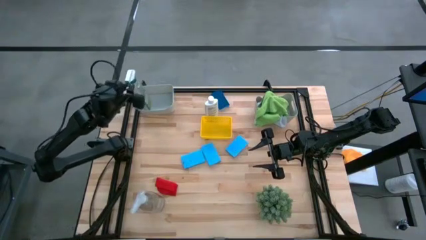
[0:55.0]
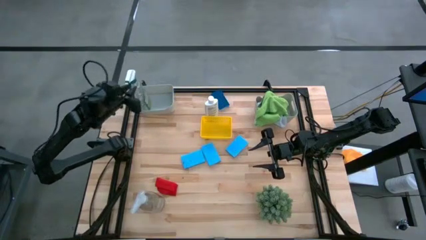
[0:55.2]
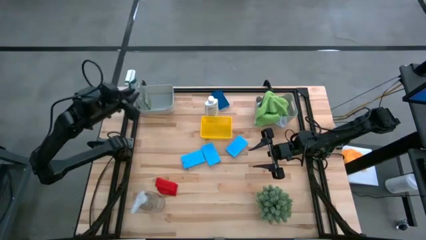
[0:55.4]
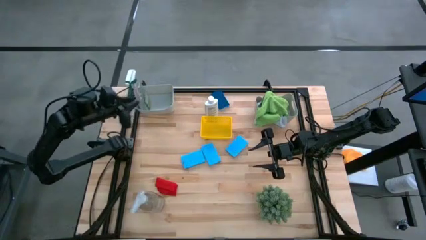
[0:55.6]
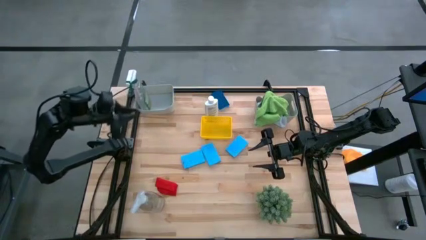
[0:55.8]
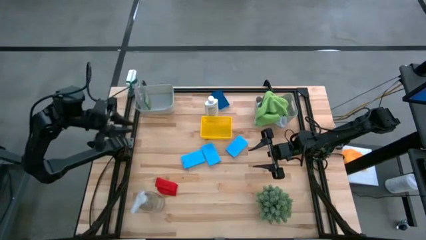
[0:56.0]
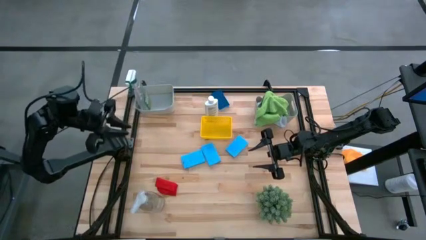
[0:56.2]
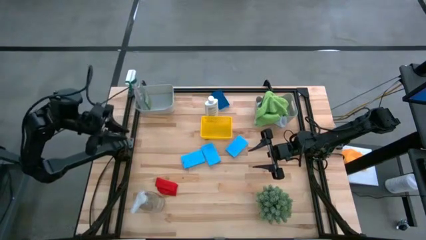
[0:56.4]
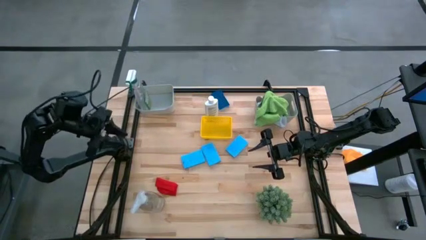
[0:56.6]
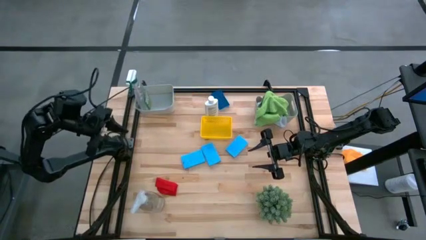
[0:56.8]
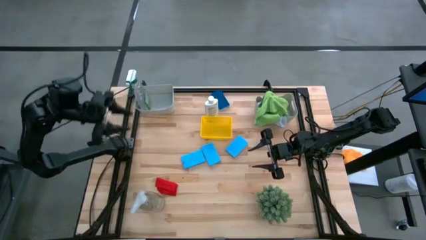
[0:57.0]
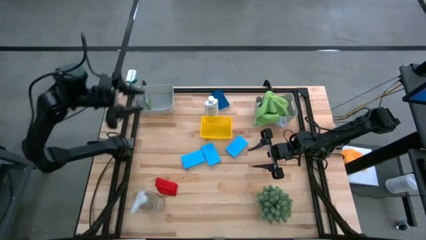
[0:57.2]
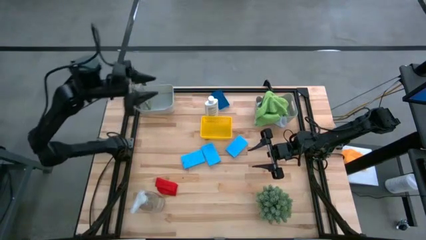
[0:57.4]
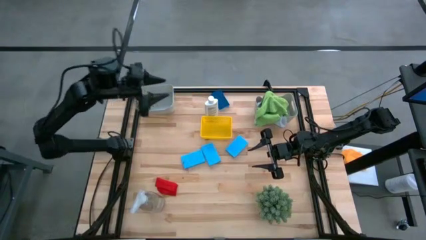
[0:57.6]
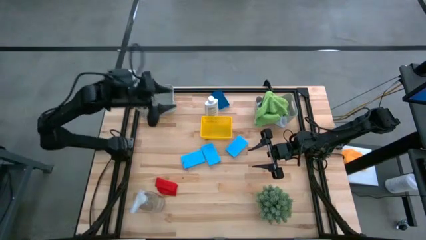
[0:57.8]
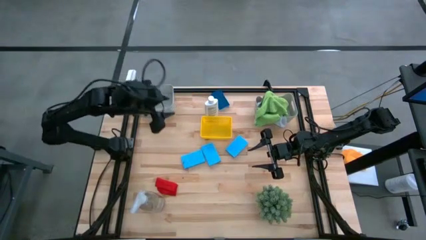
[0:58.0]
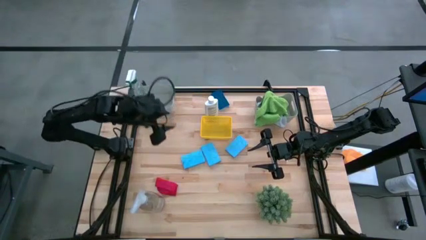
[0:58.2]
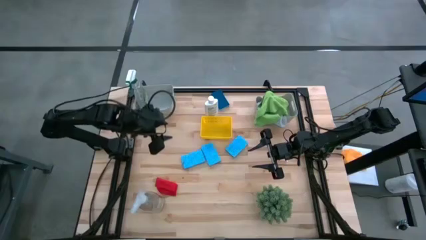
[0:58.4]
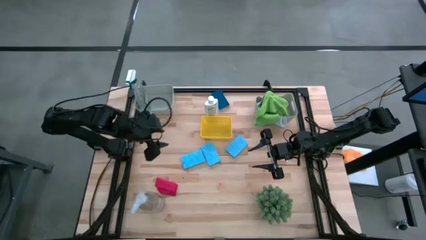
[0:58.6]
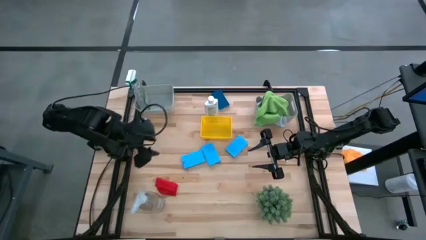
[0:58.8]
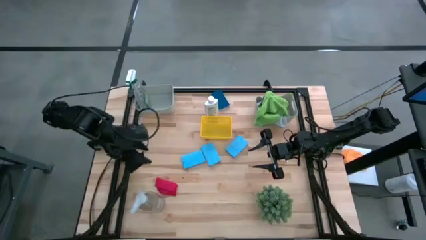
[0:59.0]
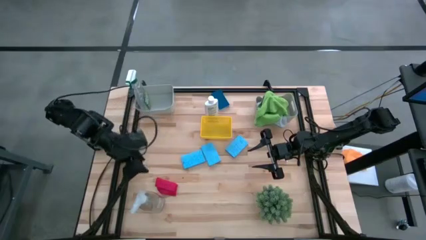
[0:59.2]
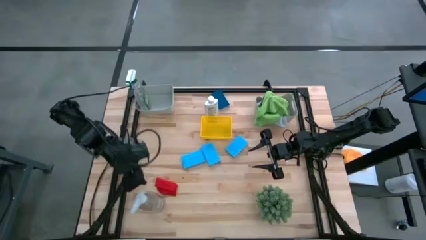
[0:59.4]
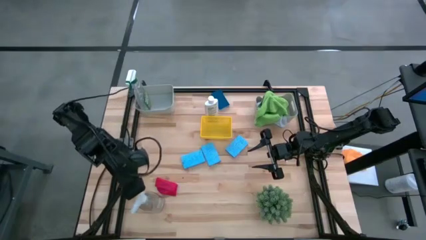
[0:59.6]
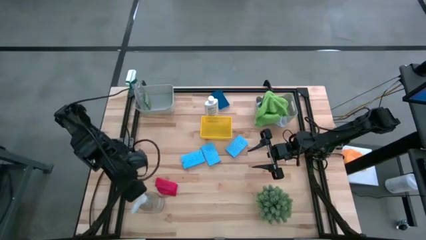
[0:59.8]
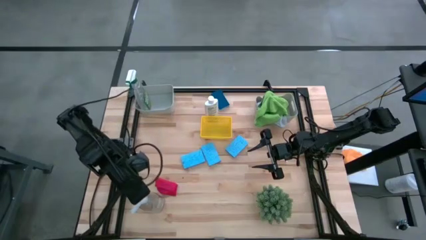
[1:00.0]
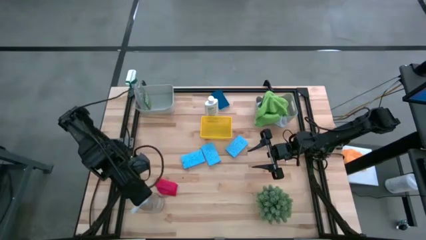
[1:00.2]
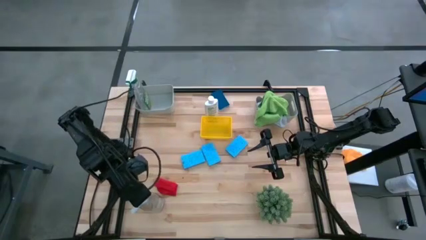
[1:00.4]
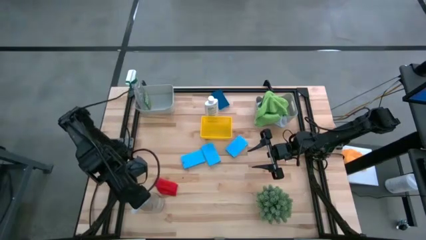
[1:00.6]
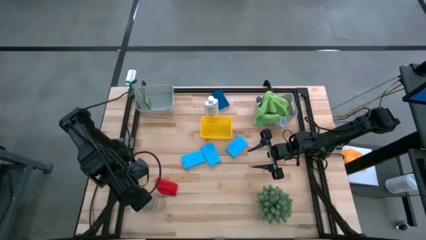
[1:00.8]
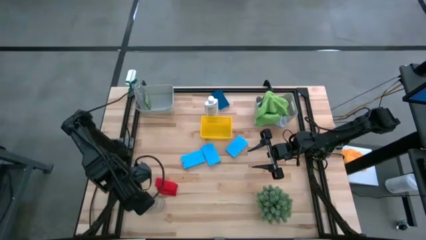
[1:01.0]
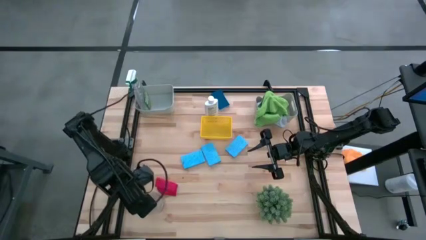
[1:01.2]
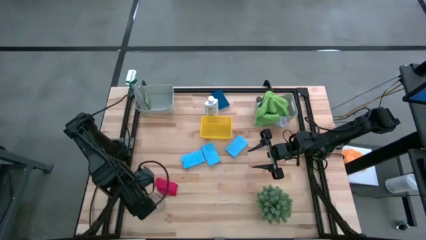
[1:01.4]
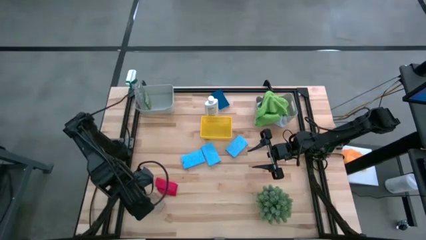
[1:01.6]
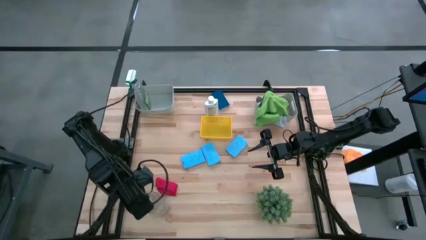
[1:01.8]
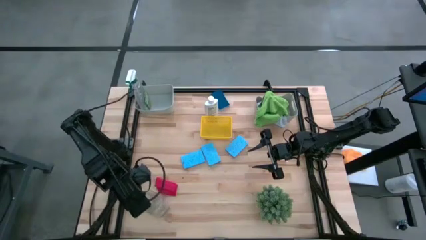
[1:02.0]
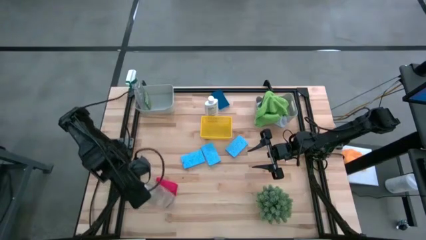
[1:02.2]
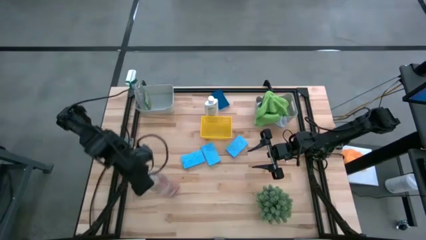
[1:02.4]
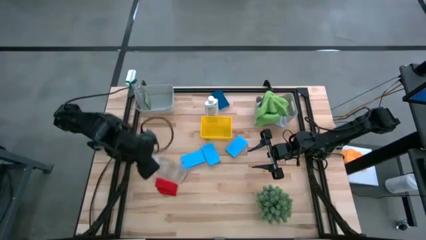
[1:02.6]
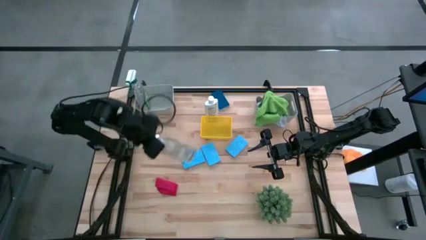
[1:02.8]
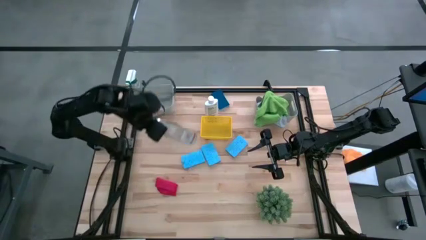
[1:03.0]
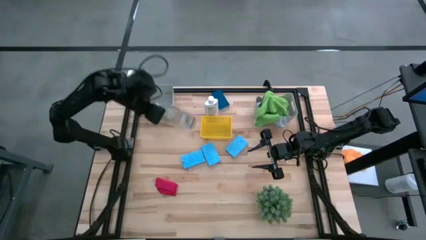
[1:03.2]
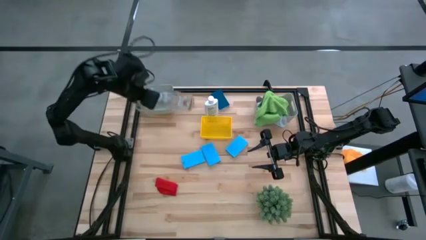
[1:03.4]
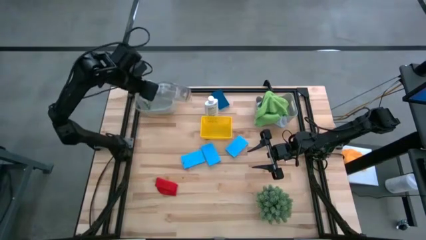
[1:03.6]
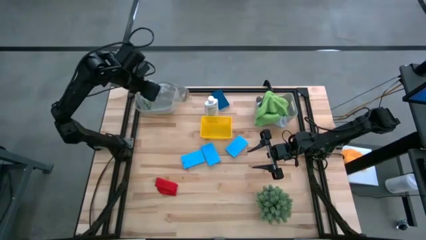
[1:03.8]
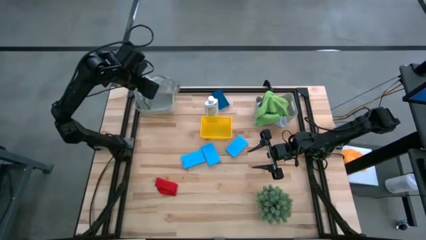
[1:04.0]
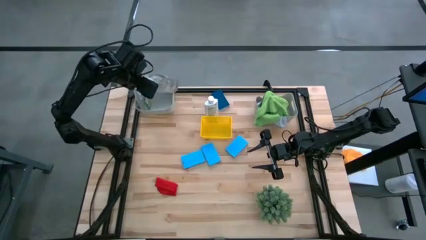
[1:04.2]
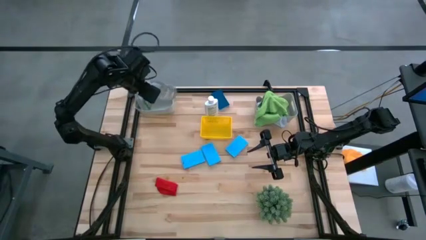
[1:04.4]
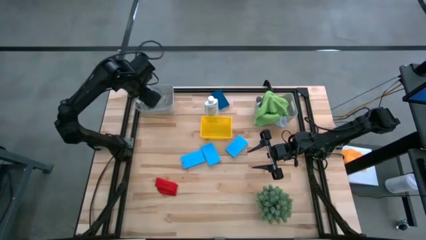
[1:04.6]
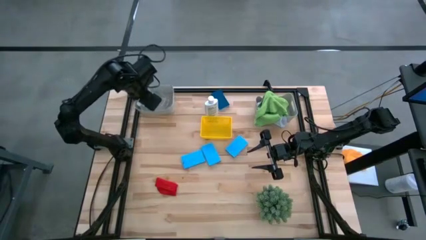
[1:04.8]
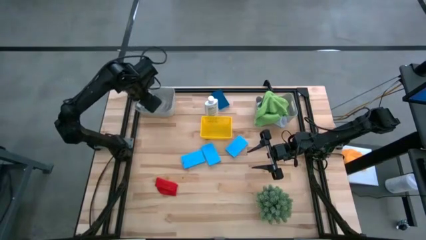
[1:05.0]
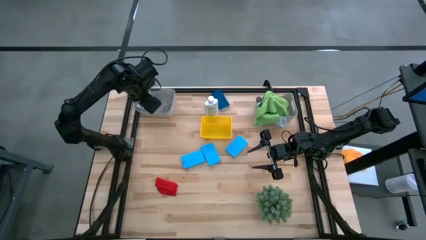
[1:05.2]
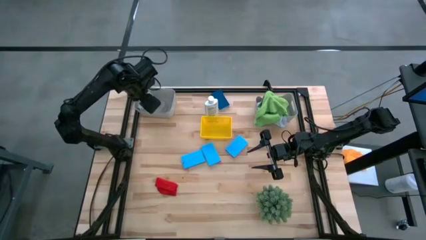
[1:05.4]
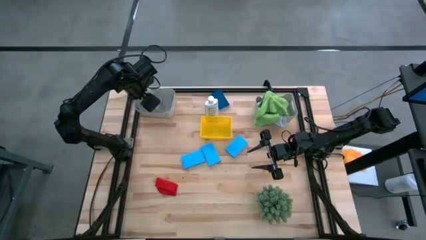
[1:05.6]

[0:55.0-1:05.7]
Task: Pick & Place Kitchen Items
Put the transparent spray bottle into the left gray bin
